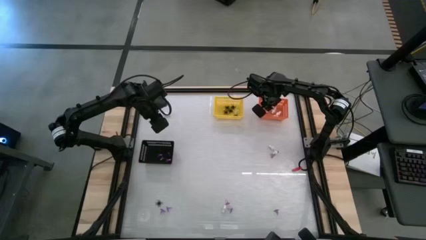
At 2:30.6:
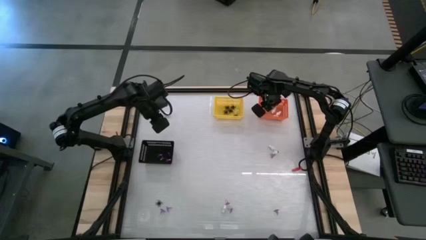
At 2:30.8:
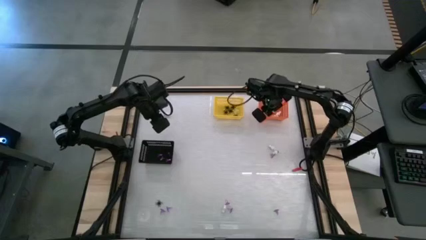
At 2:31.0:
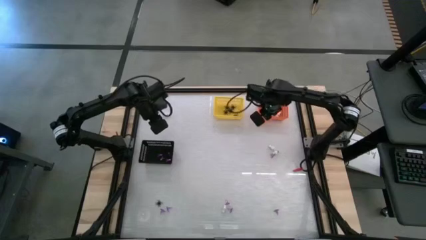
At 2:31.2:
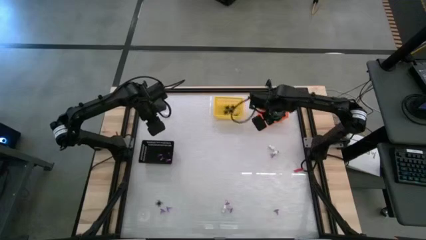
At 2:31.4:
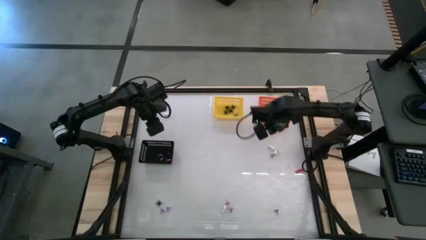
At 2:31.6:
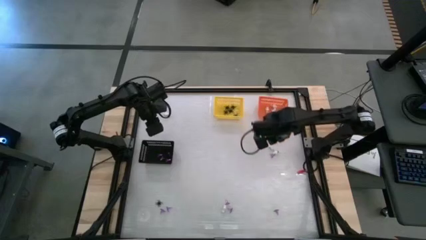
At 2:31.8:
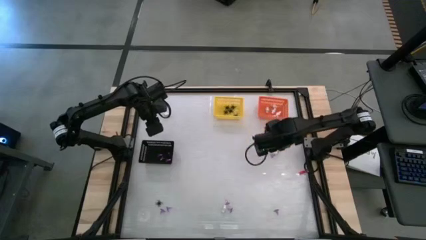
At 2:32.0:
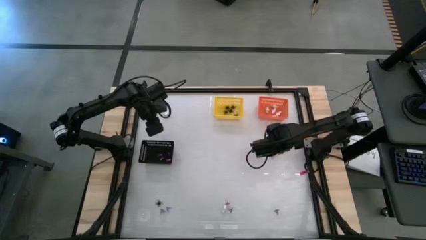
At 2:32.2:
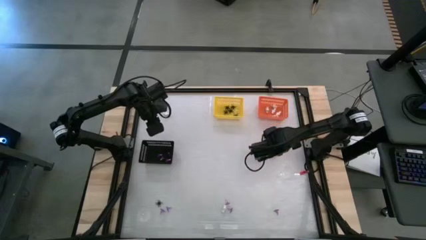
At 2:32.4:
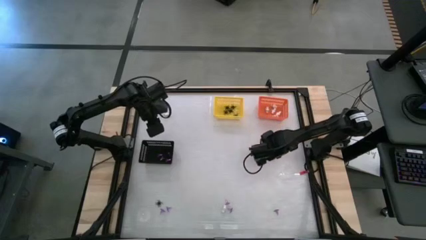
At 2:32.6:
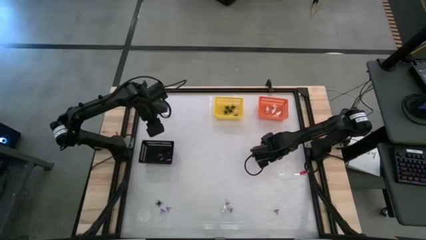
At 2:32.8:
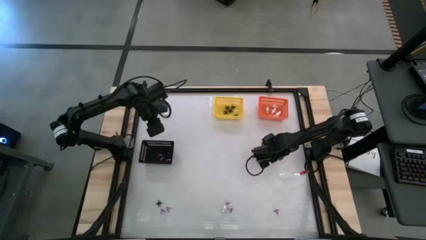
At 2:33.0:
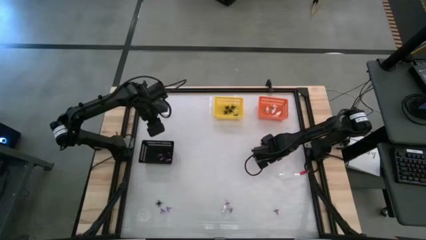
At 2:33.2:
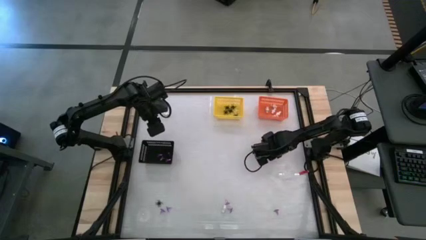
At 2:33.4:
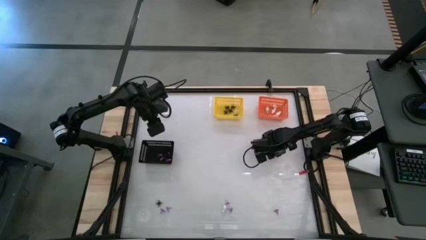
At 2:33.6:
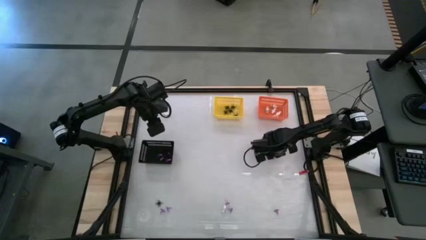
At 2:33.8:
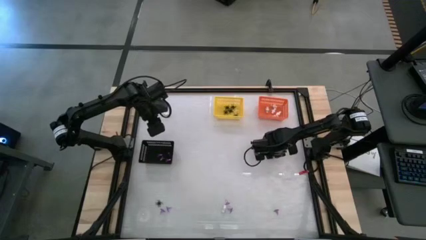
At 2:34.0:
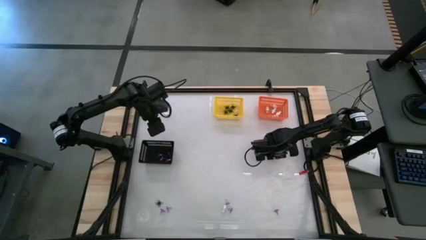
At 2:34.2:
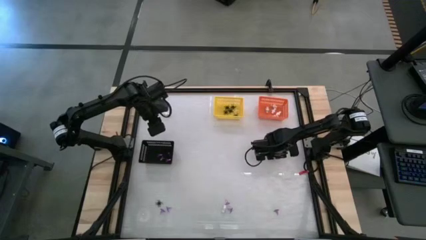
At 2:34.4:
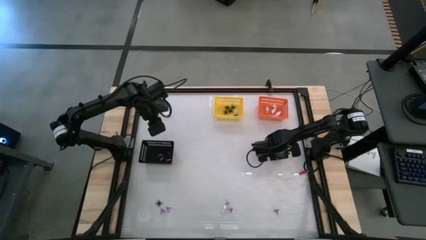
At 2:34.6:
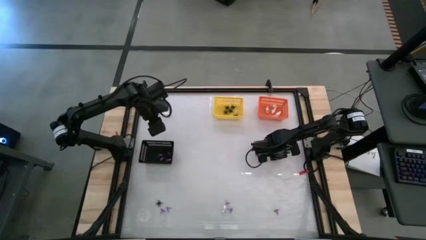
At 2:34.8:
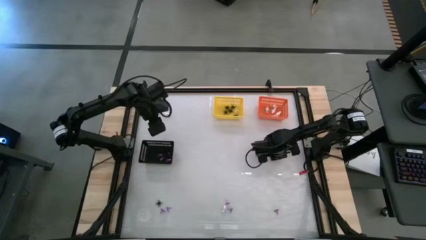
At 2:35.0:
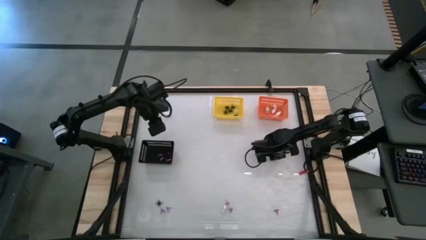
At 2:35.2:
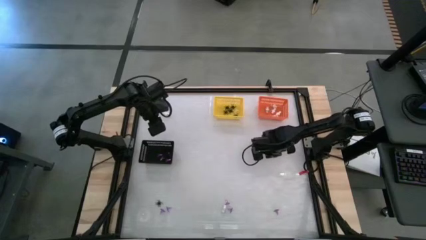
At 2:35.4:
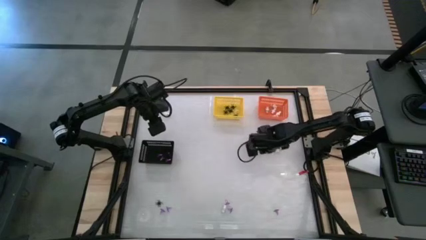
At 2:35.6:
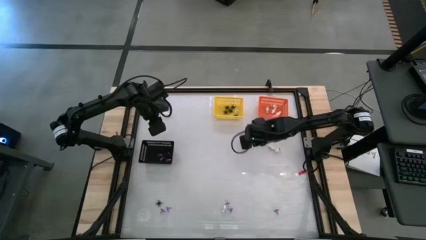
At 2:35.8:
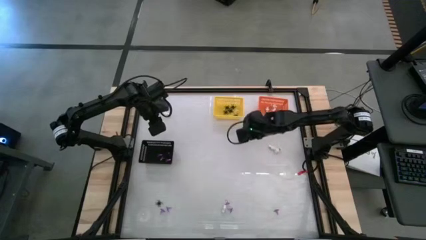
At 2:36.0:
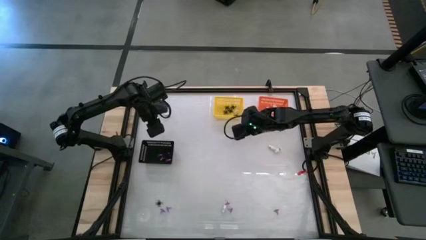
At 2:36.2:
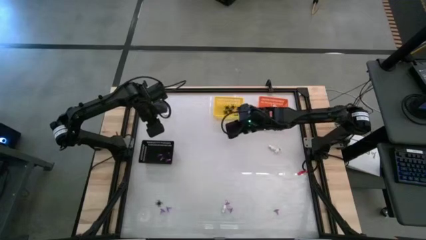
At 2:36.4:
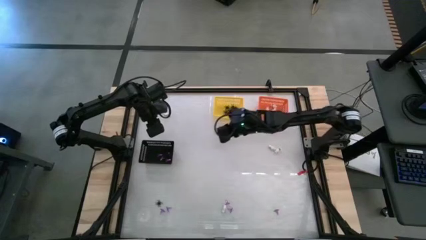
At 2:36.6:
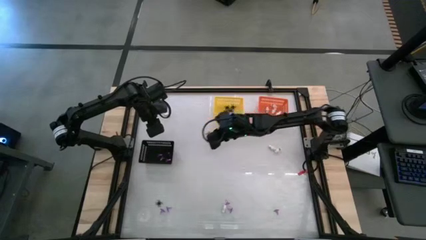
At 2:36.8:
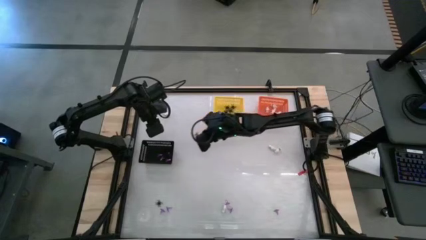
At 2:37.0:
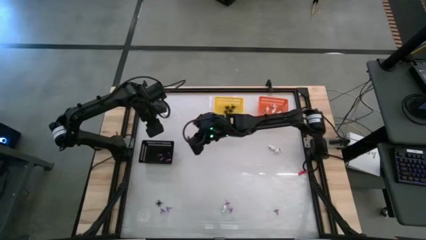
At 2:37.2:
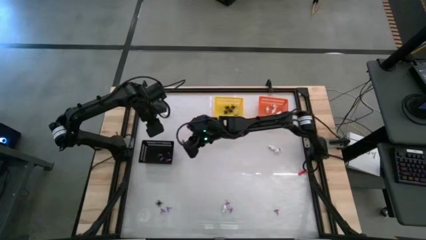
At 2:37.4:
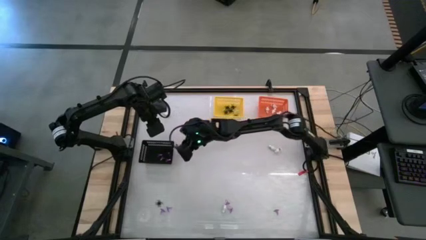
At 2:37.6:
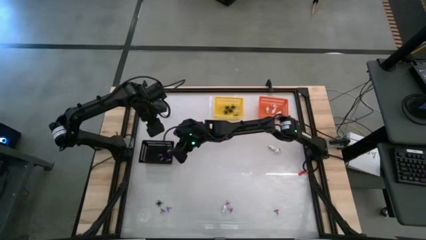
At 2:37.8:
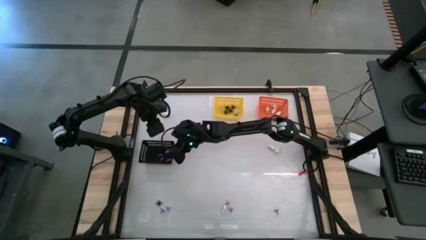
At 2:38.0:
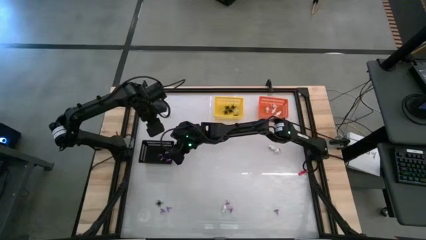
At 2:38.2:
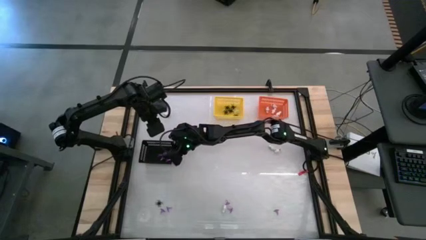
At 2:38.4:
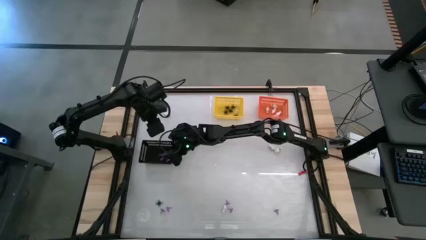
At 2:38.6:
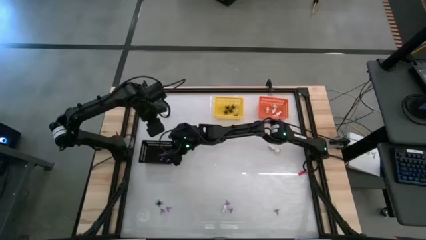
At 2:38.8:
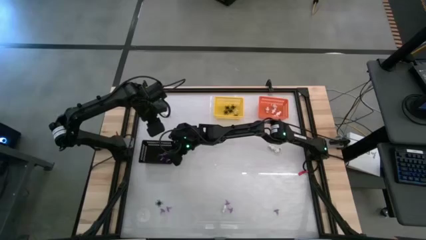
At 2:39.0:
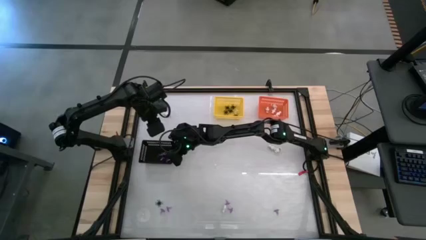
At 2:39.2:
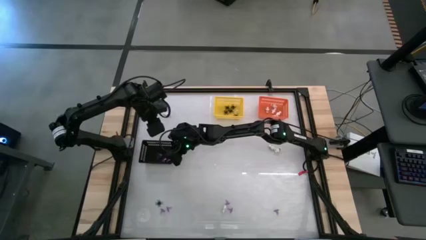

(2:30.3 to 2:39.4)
Task: Sort Halloween decoration
Put the purple witch hat toy into the black bin

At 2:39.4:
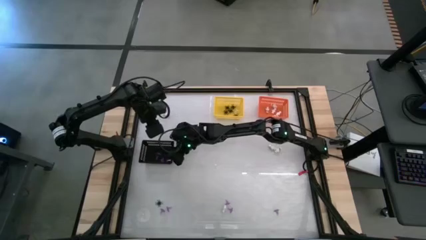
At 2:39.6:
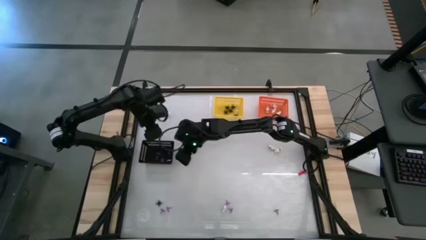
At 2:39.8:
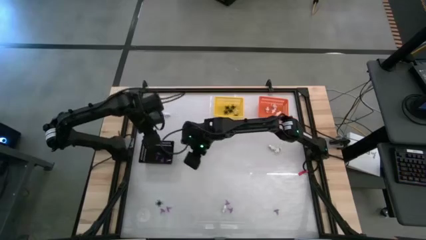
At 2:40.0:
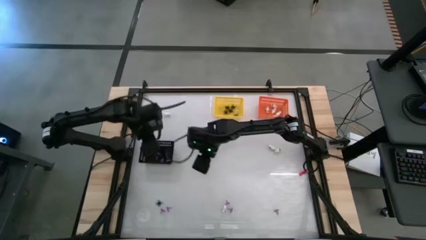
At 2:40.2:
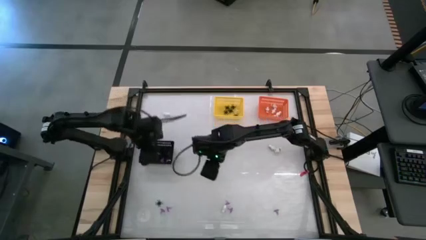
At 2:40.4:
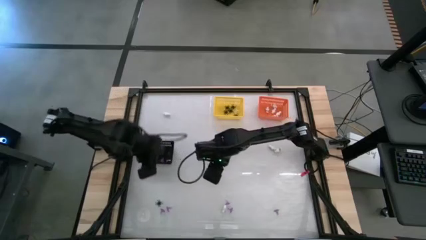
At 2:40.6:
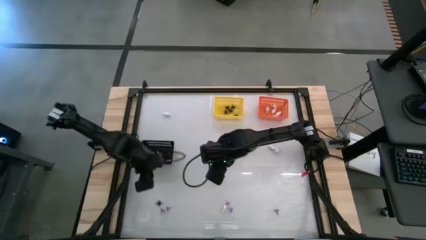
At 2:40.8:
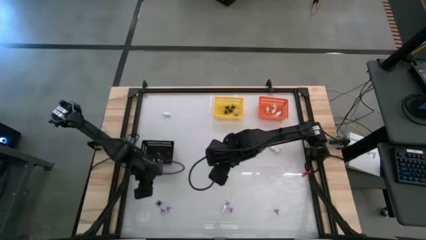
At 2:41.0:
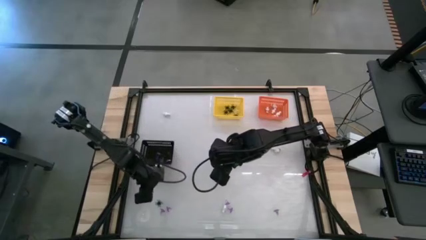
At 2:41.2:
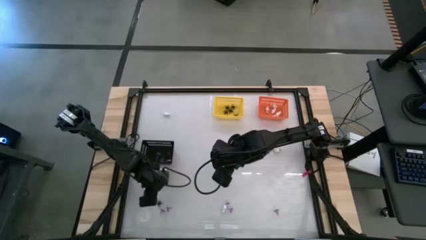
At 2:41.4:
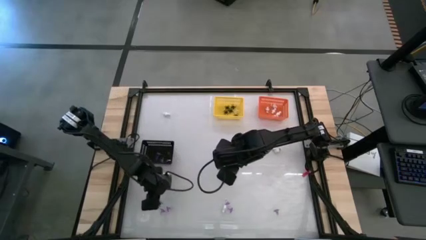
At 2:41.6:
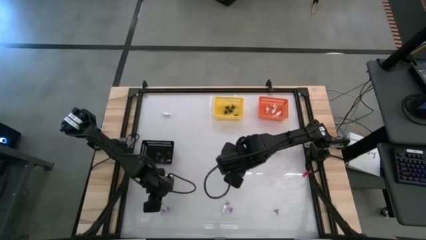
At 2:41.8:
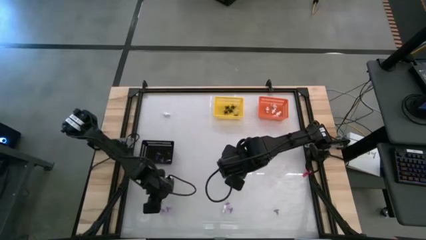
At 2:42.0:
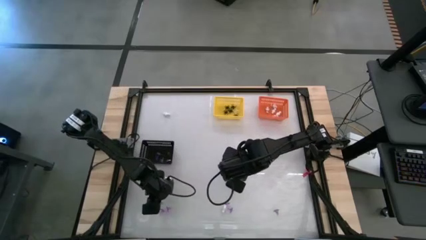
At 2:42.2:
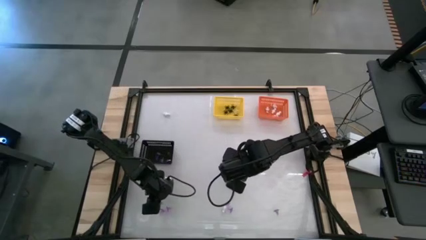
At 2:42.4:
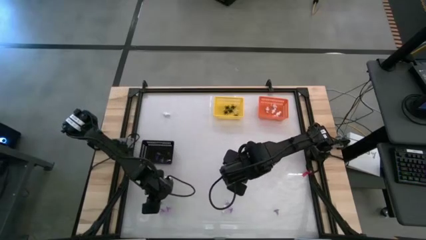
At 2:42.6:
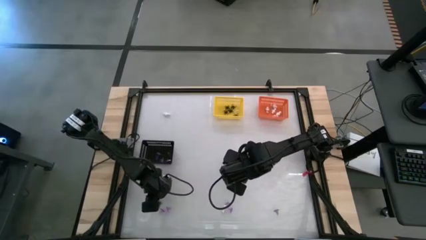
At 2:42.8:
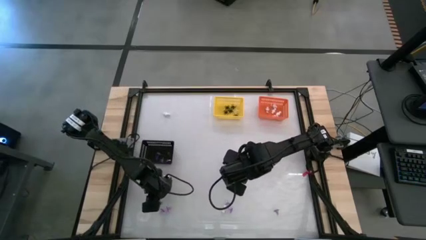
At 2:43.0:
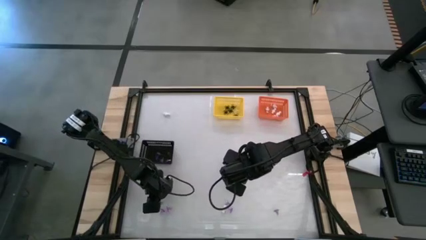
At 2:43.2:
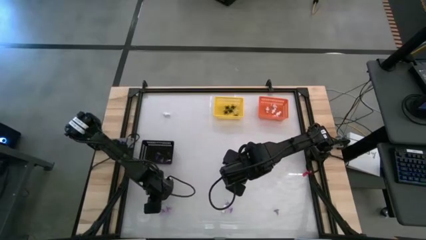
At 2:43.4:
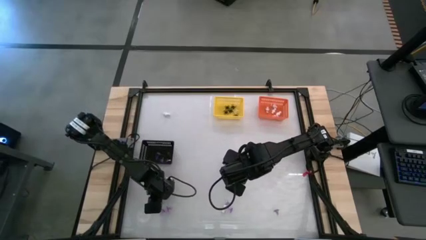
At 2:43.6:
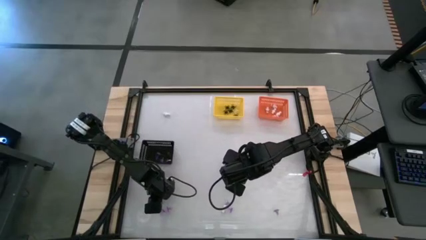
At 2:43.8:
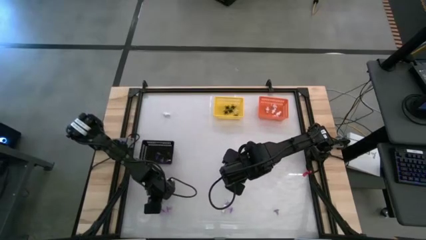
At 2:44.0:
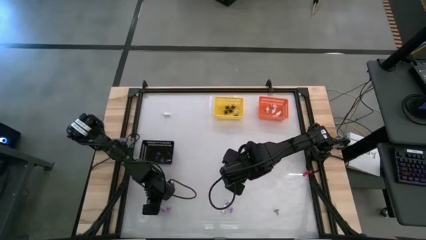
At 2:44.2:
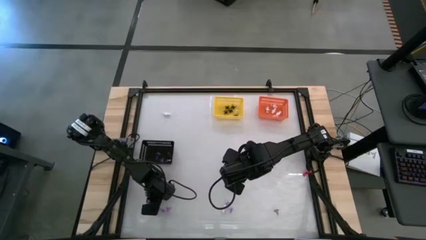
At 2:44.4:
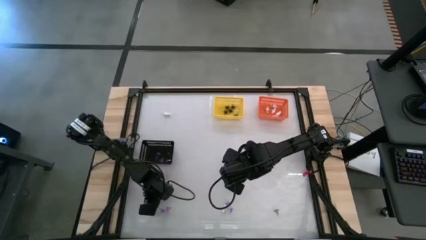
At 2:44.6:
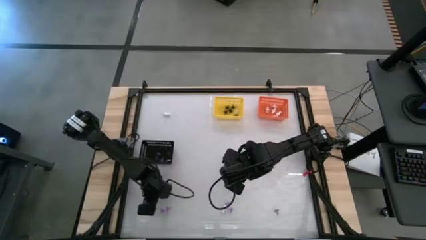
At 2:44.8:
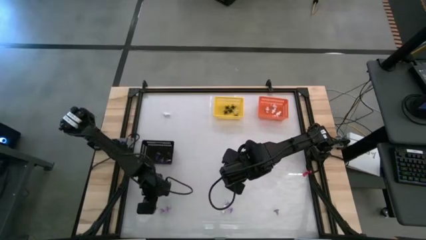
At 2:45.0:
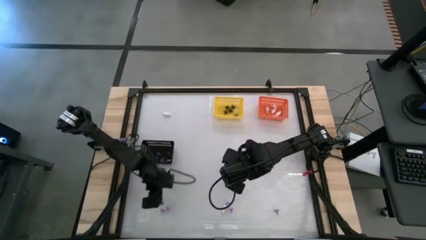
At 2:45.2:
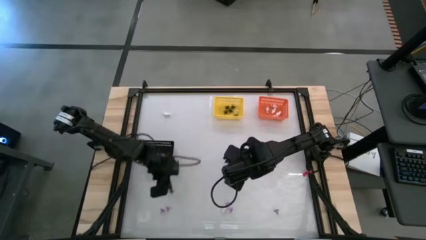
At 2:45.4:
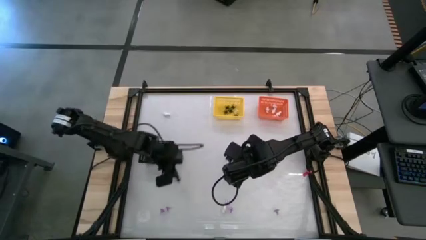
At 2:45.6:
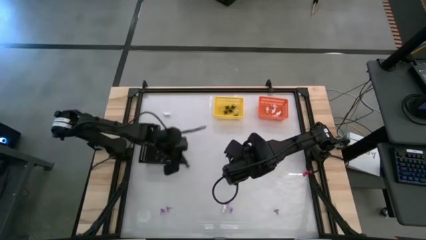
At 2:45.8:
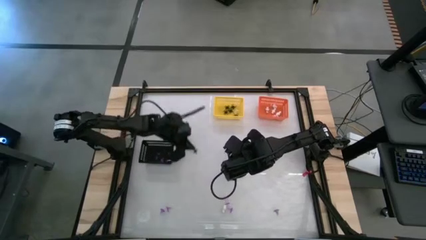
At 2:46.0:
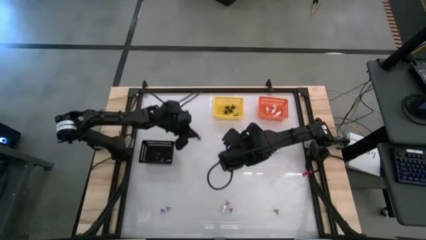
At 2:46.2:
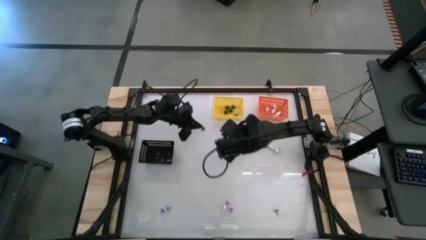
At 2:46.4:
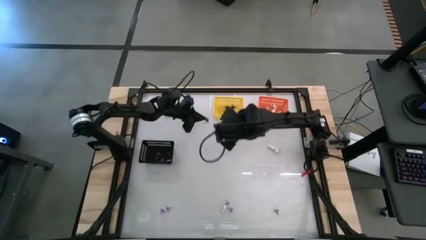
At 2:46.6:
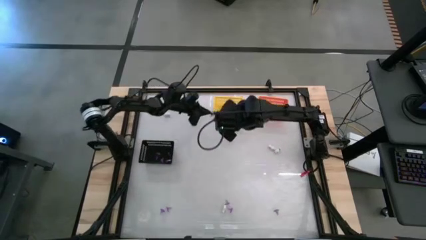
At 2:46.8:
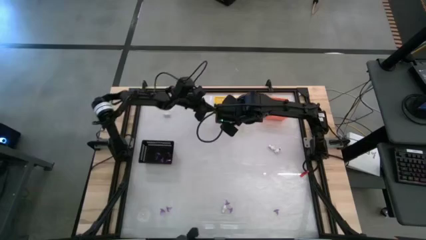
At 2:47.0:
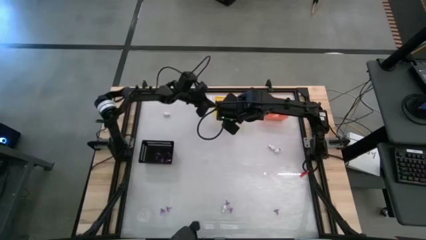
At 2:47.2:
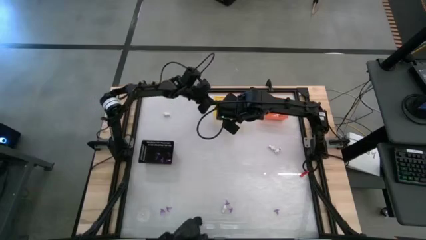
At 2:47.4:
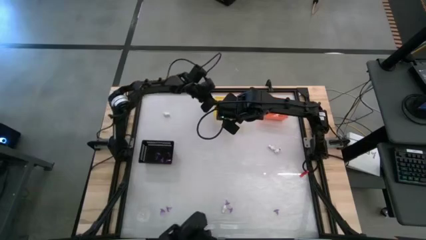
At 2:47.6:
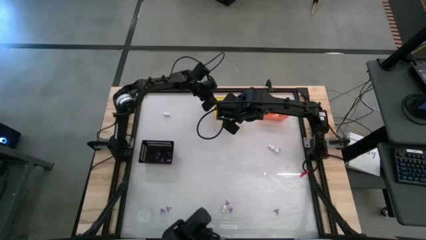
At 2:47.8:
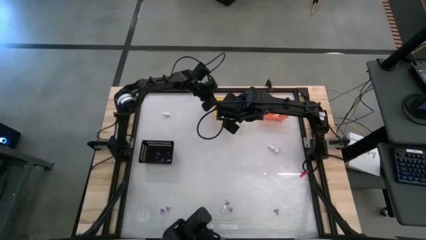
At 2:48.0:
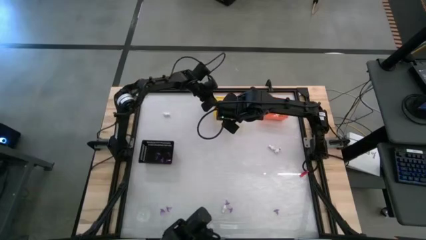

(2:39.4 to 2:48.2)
Put the black spider toy into the yellow bin
